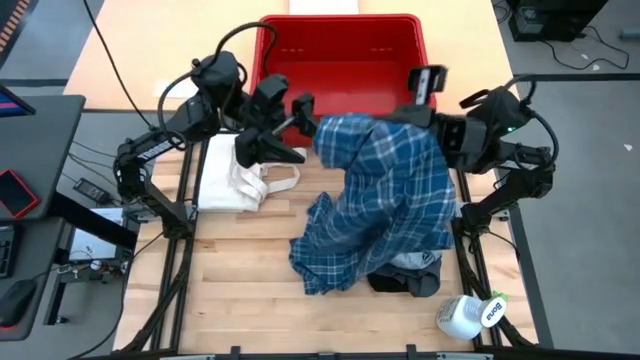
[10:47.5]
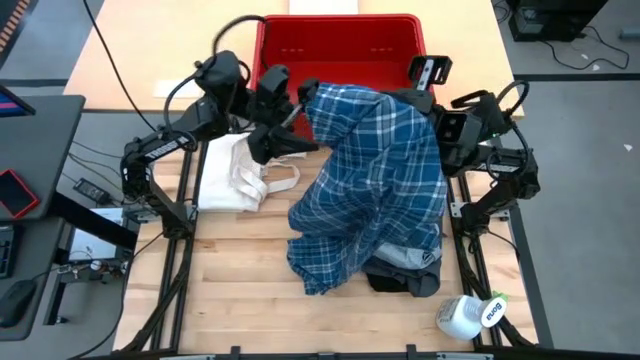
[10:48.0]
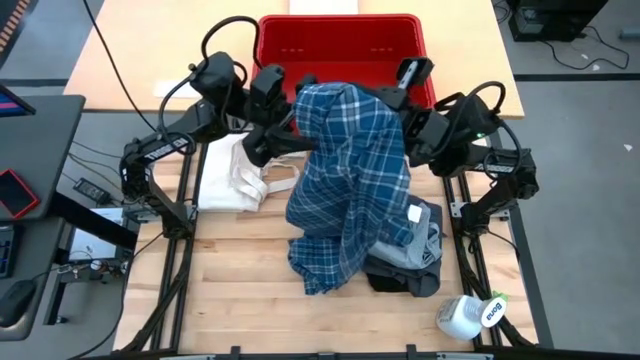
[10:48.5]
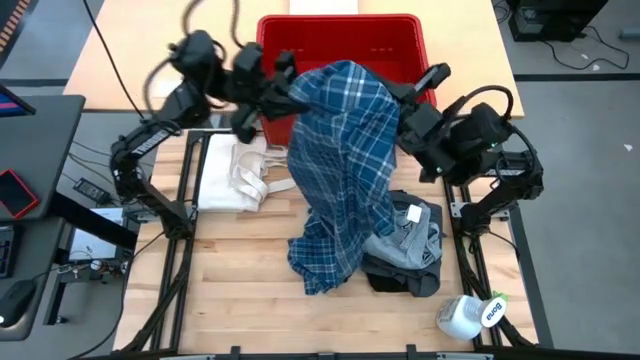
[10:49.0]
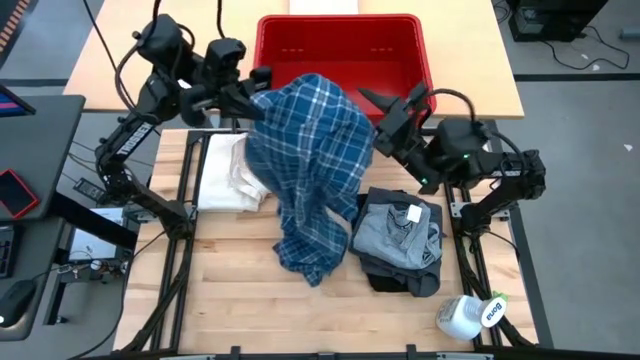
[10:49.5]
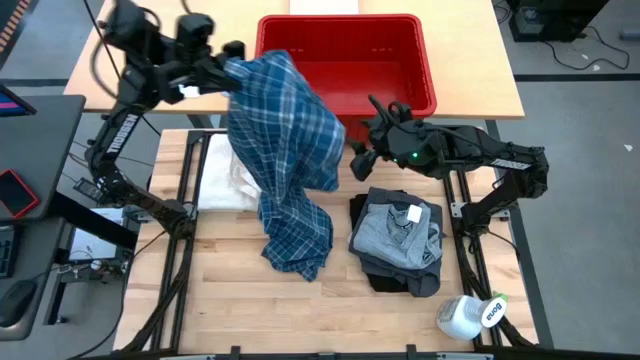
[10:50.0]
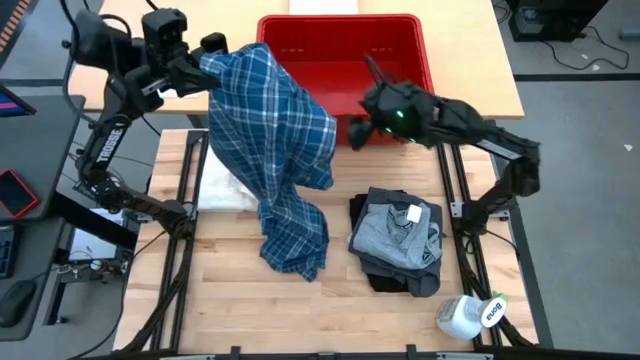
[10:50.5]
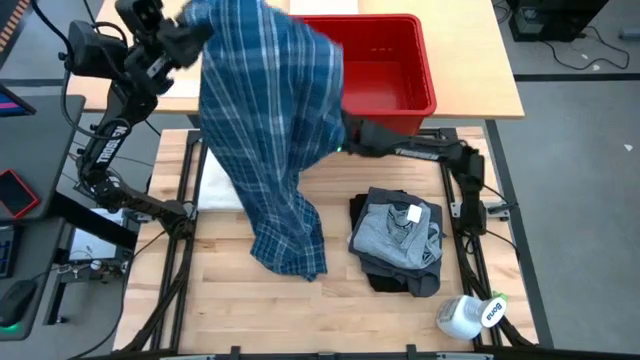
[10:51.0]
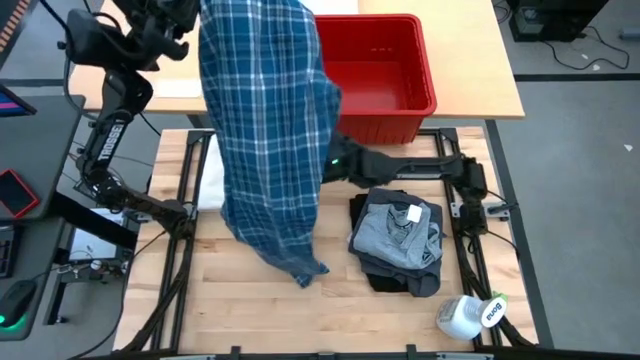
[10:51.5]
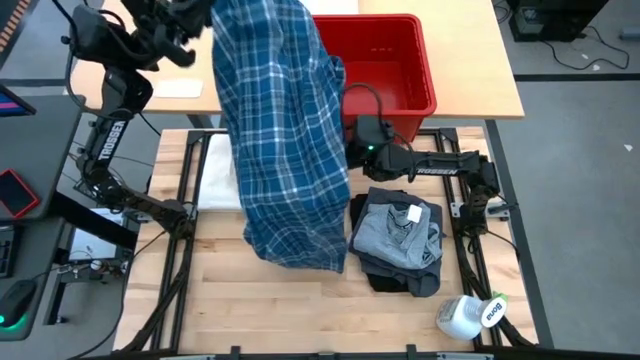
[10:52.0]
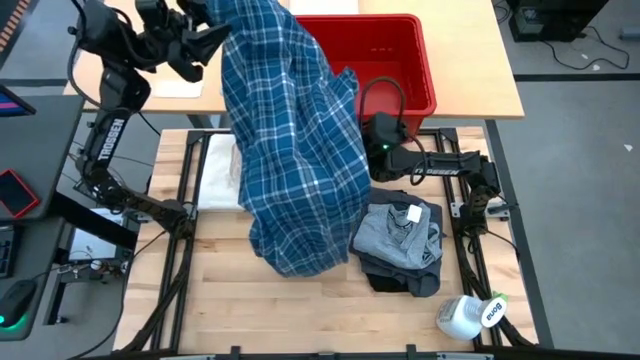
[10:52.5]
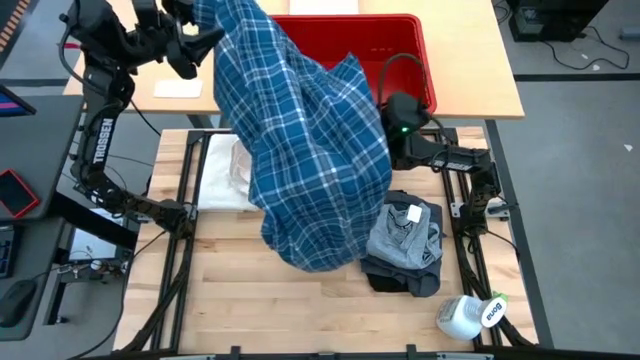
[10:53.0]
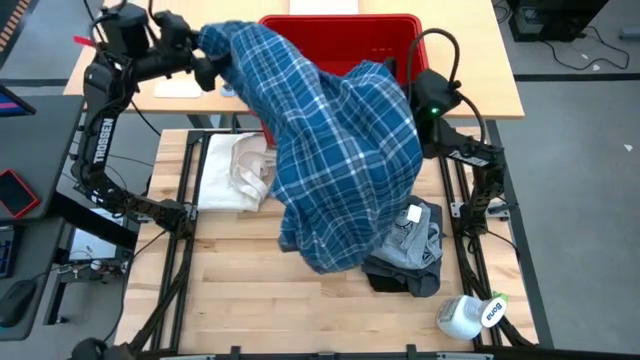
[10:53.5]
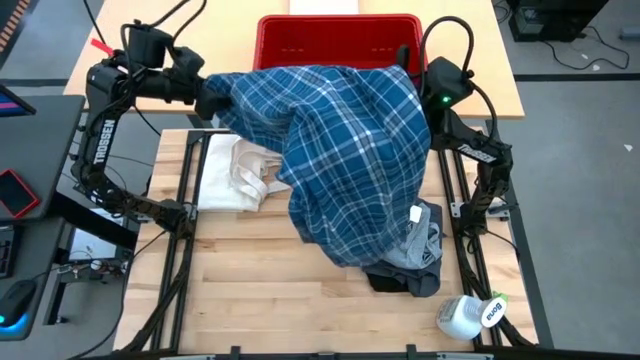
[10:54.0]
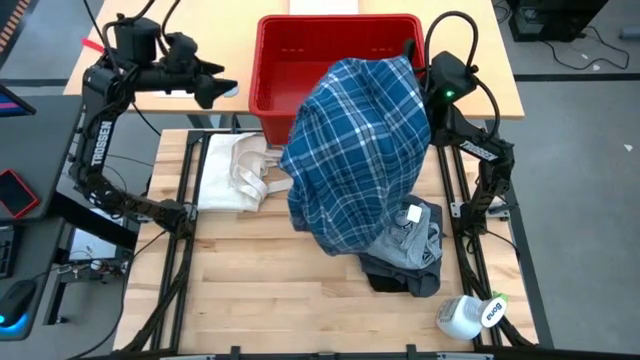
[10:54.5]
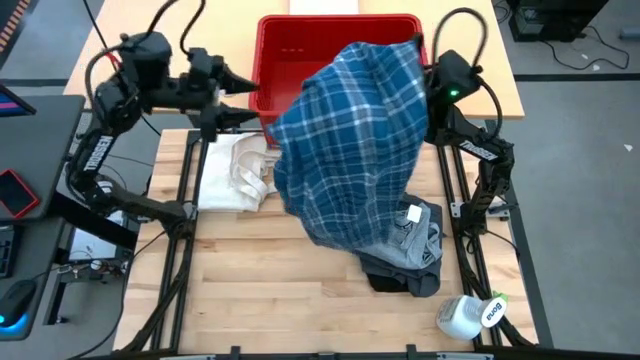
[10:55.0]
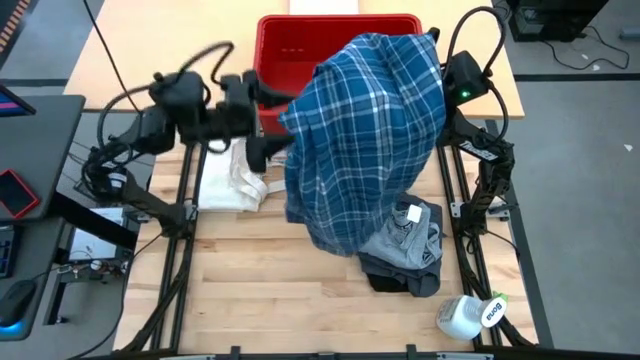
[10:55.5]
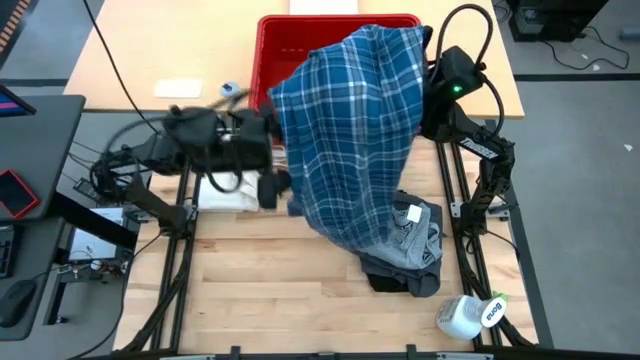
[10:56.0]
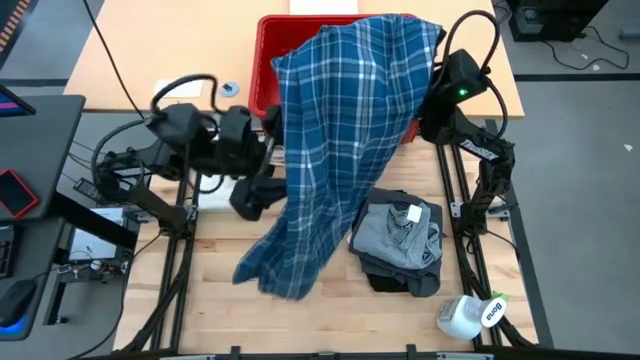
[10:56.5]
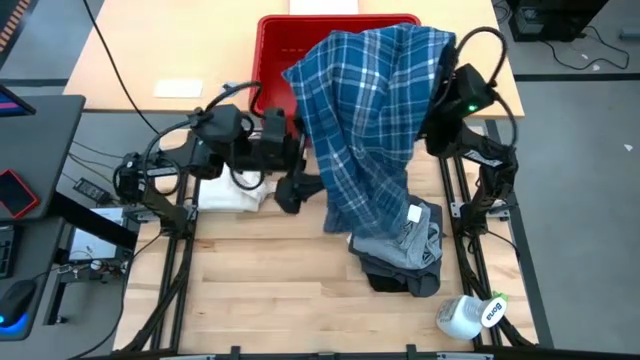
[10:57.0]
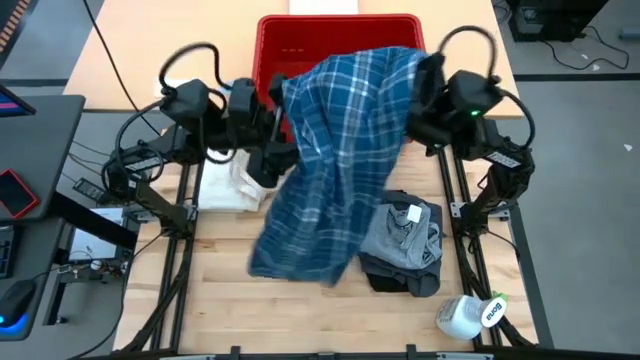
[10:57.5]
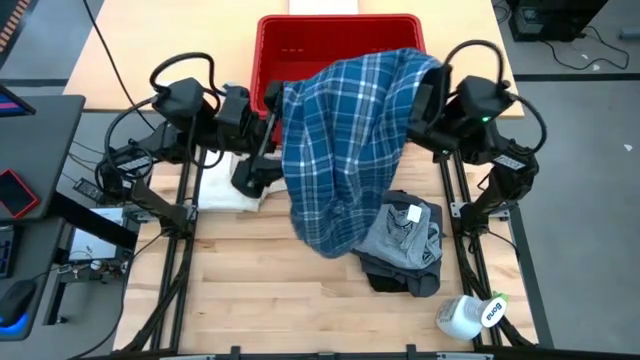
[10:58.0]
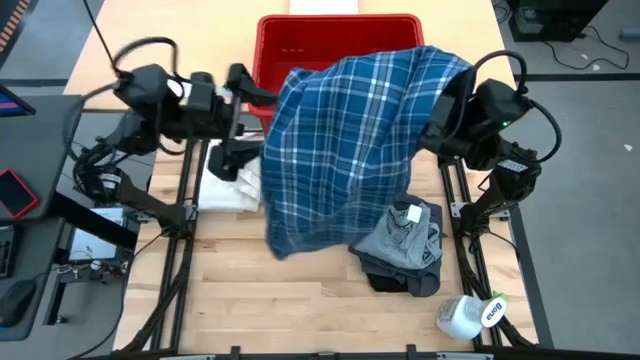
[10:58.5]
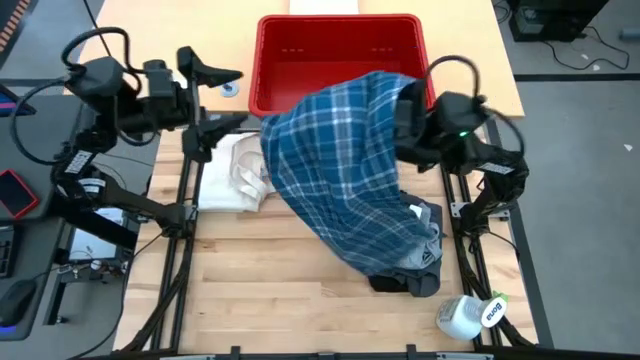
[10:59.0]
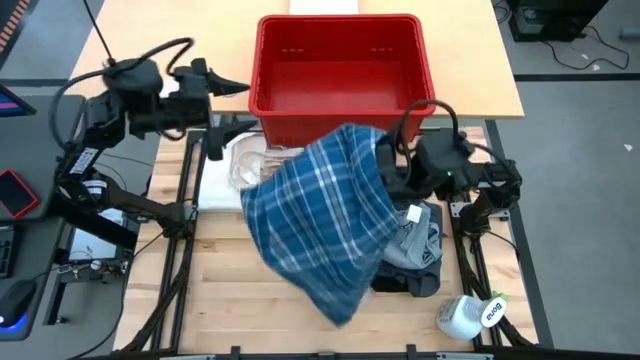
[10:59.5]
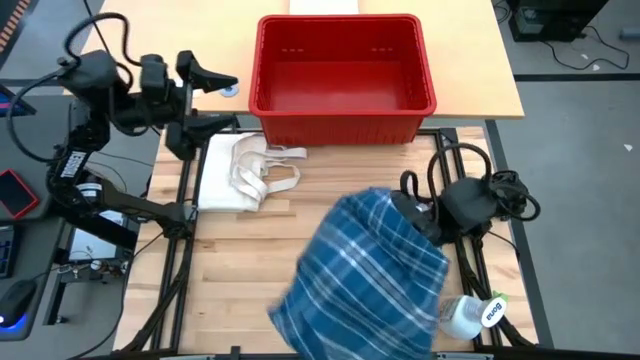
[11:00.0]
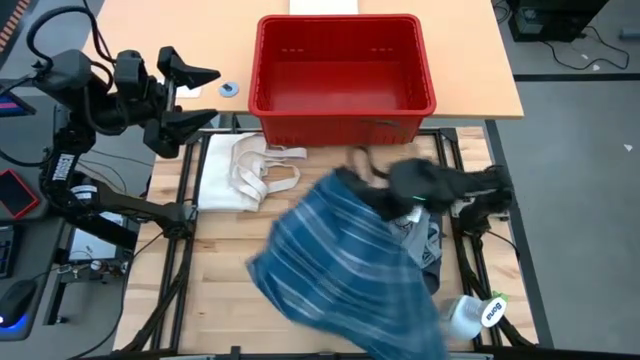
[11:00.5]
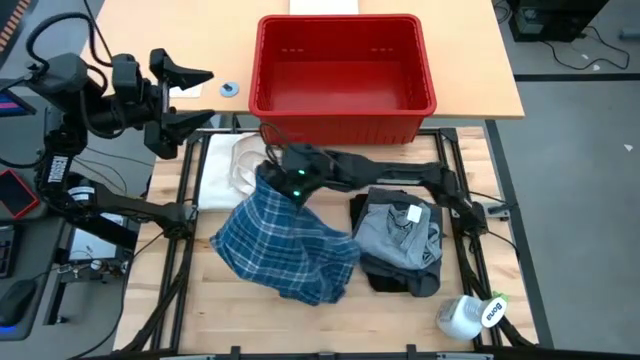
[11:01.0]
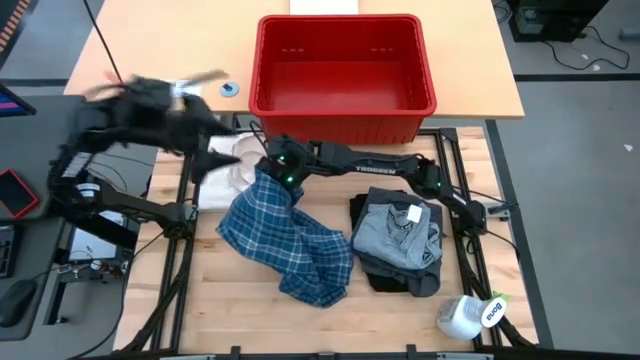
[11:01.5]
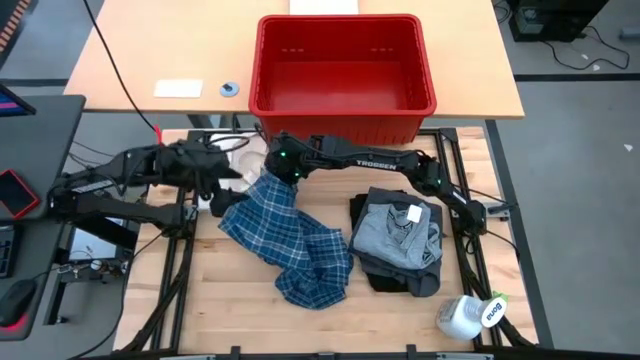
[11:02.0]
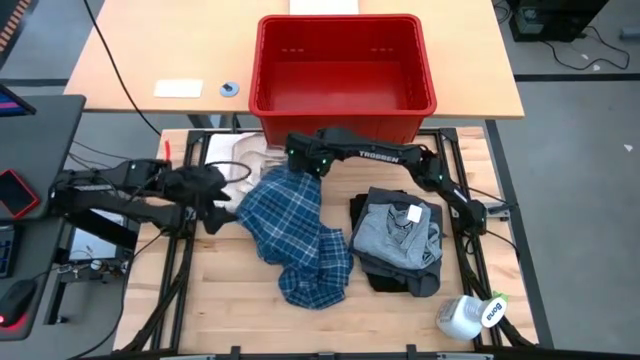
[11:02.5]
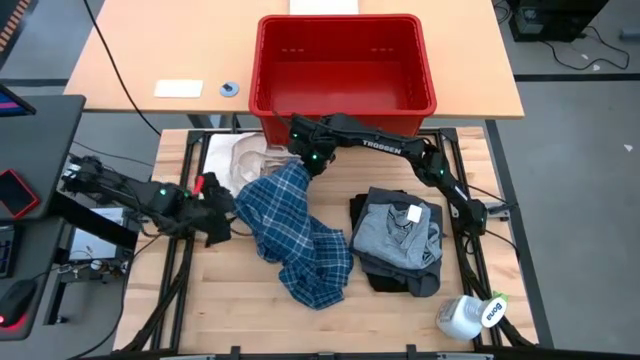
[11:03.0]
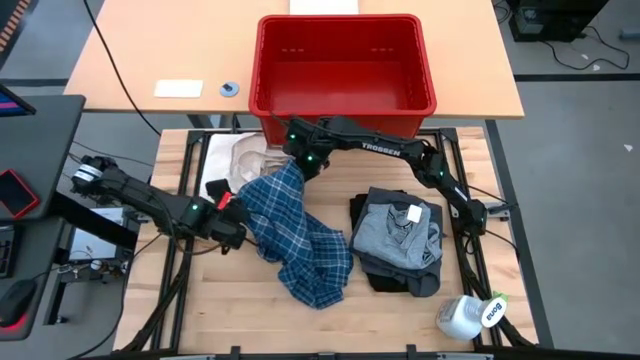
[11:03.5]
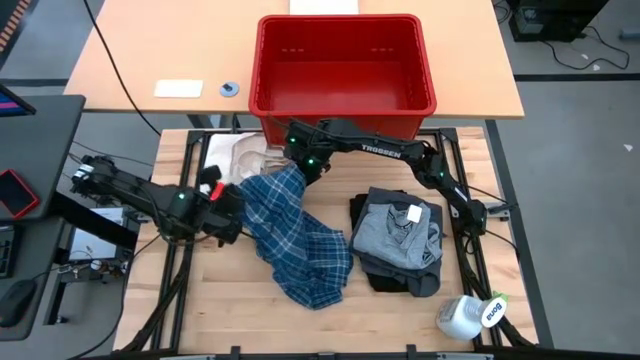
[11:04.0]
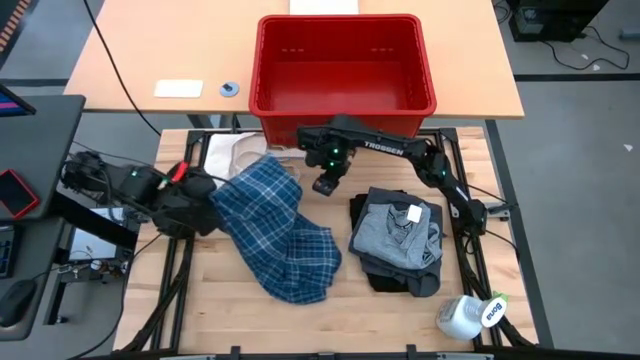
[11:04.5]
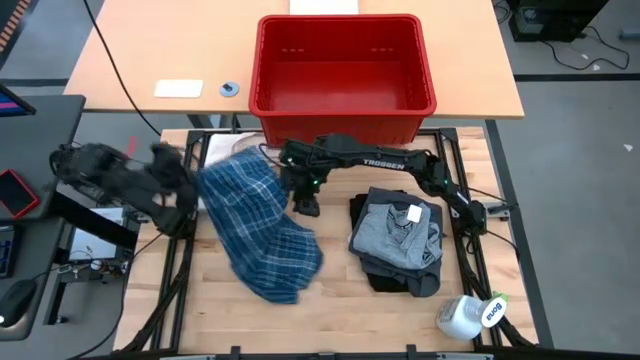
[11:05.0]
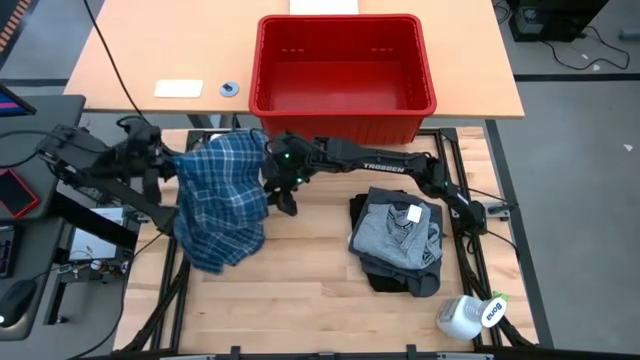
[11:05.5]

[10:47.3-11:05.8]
Task: Fold Laundry from Bin
Fold the blue checkered pants

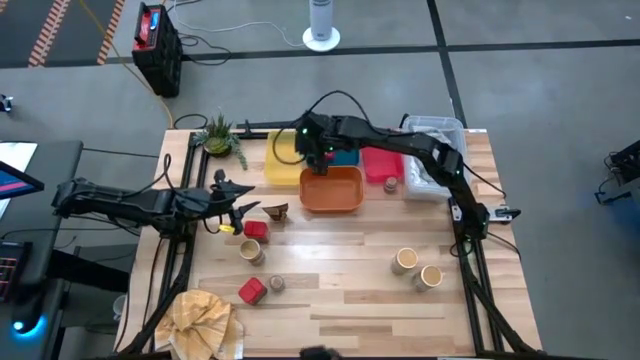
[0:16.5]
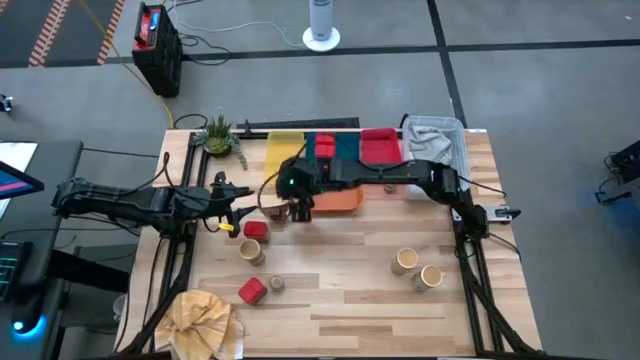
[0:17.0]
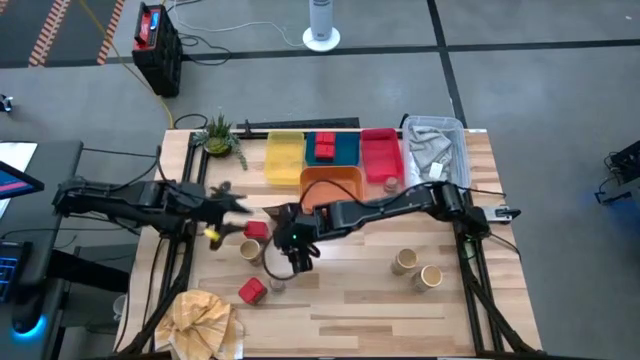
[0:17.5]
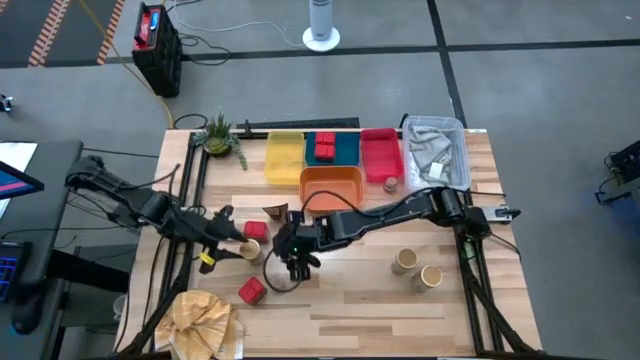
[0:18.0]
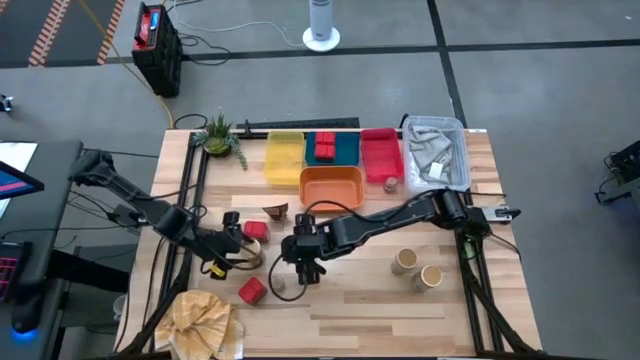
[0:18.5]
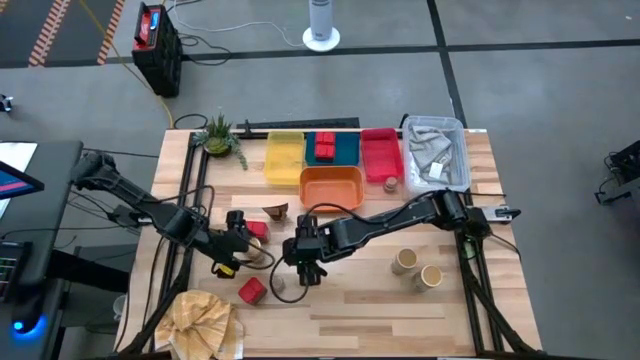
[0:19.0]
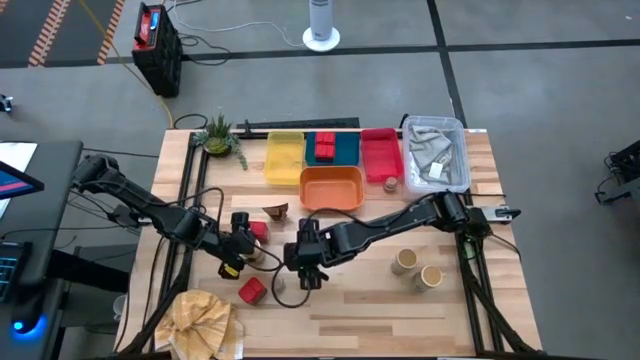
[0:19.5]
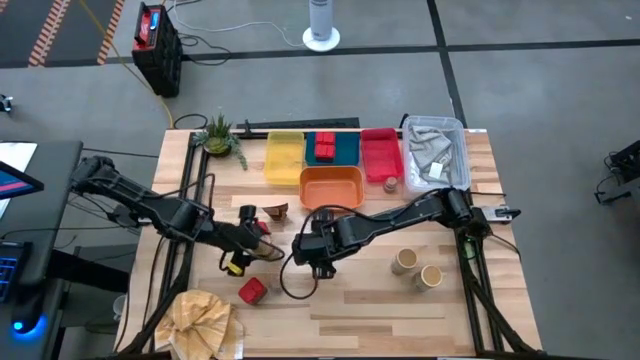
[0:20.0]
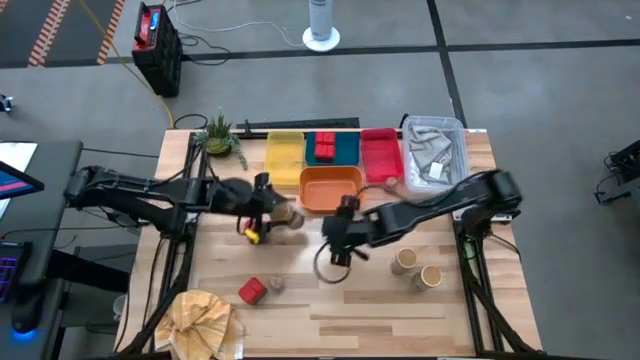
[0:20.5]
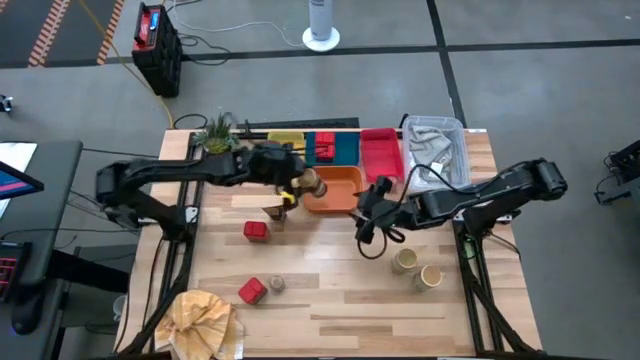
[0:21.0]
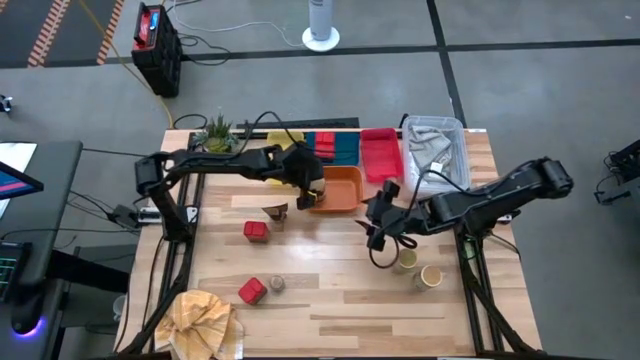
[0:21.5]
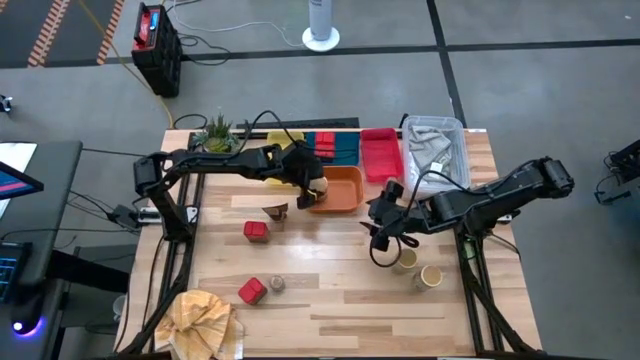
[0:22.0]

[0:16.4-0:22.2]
Task: Sort spices by type
Put the gold seasoning bottle into the orange bin
